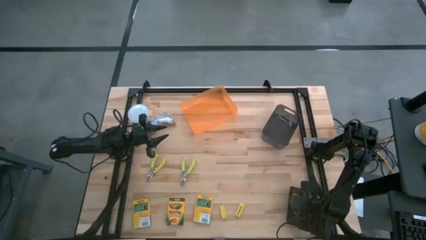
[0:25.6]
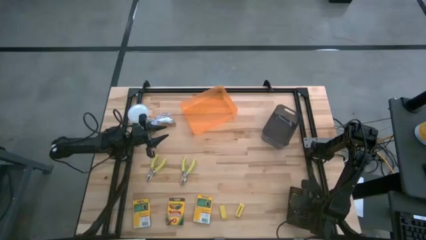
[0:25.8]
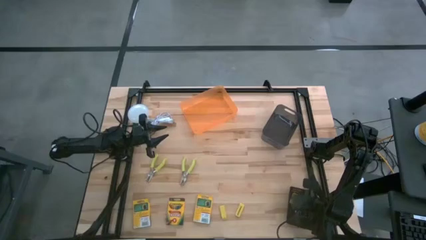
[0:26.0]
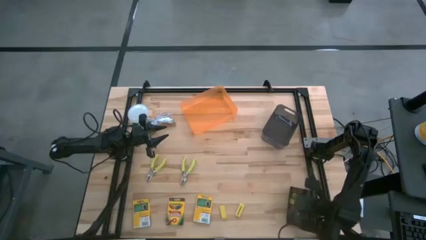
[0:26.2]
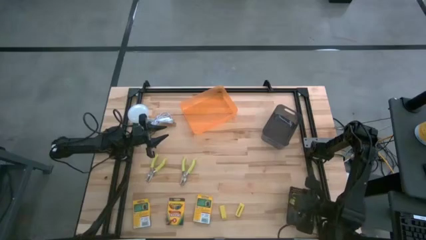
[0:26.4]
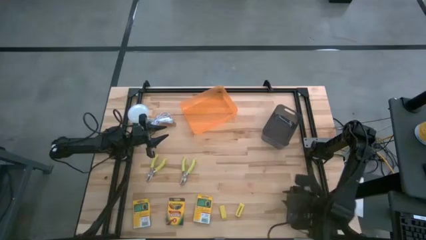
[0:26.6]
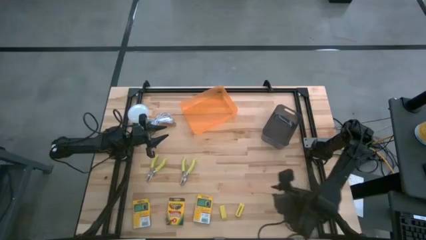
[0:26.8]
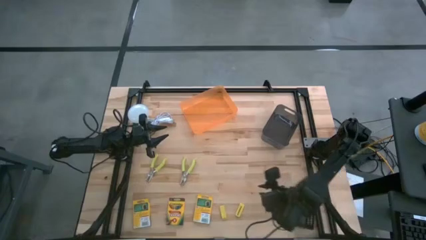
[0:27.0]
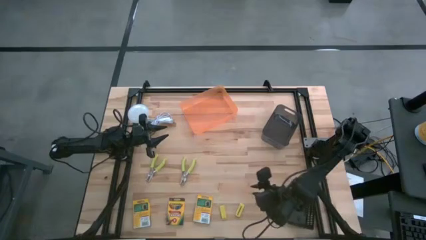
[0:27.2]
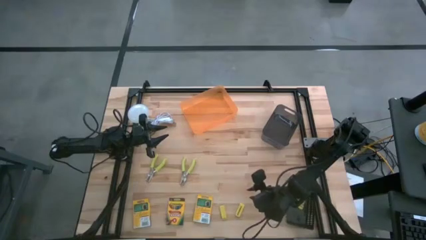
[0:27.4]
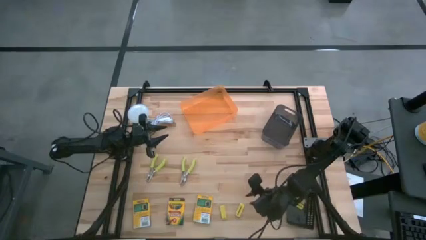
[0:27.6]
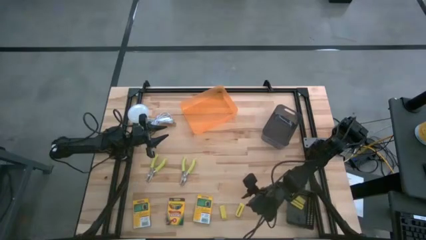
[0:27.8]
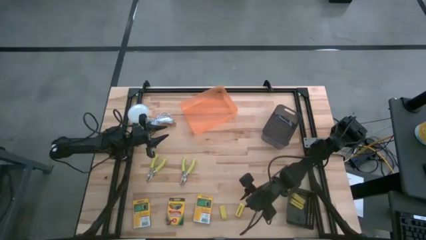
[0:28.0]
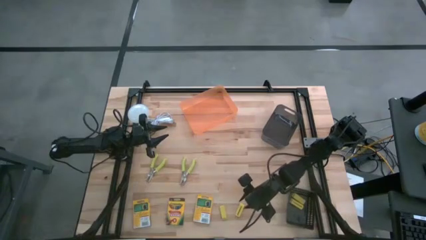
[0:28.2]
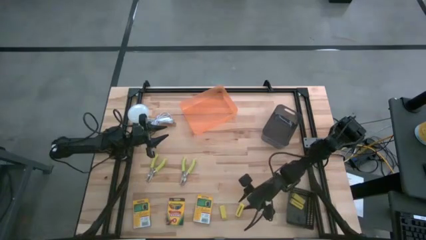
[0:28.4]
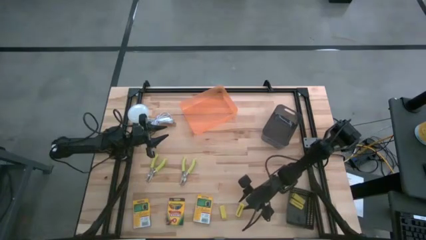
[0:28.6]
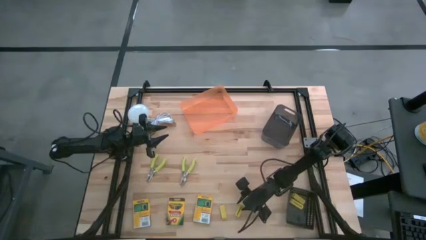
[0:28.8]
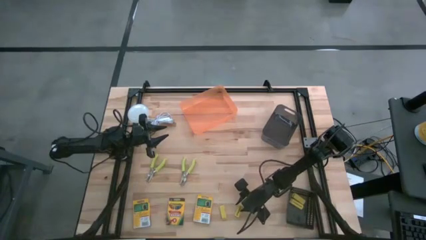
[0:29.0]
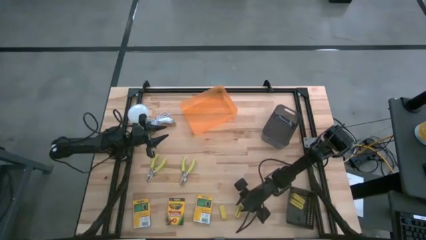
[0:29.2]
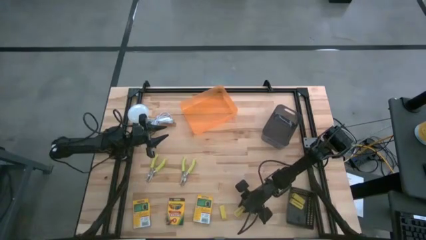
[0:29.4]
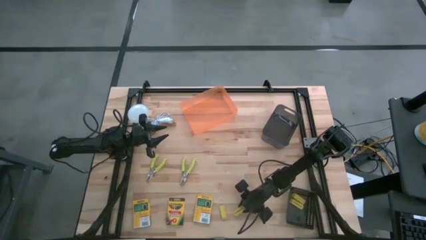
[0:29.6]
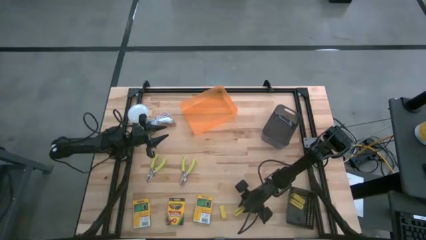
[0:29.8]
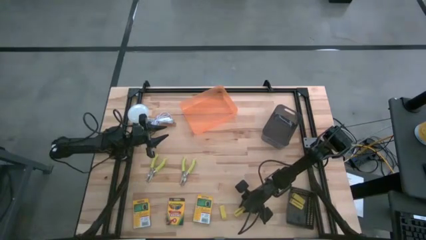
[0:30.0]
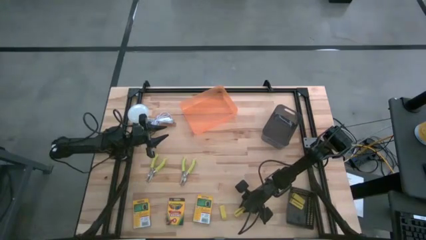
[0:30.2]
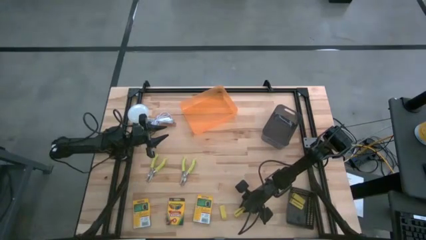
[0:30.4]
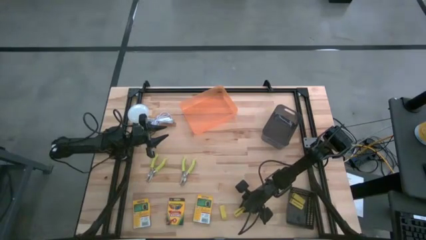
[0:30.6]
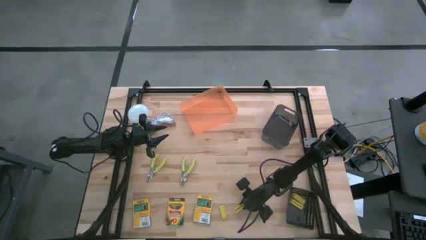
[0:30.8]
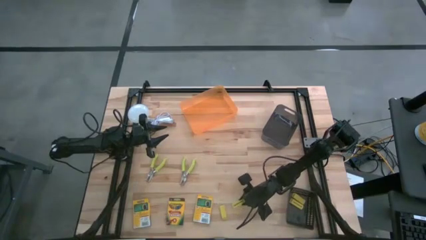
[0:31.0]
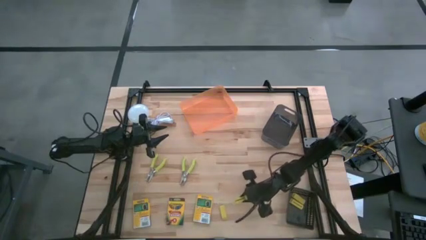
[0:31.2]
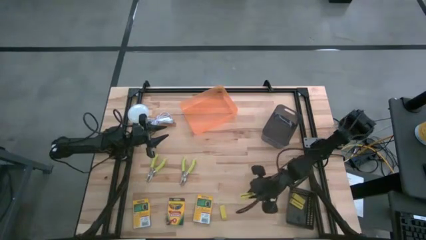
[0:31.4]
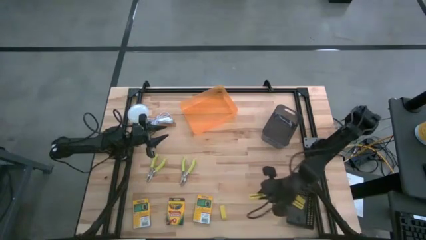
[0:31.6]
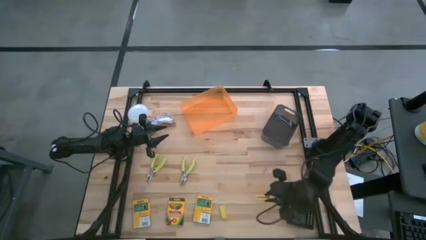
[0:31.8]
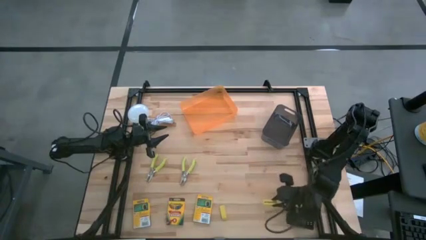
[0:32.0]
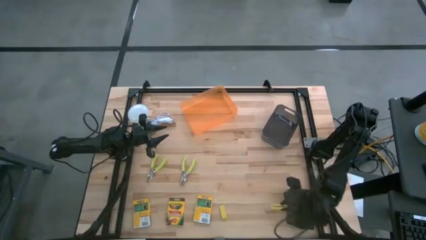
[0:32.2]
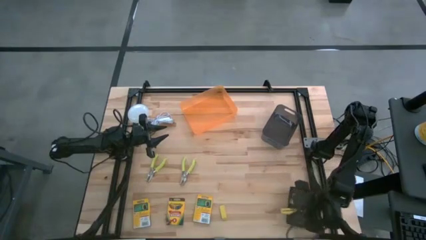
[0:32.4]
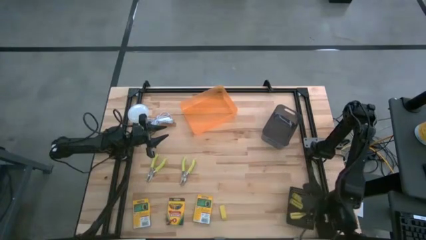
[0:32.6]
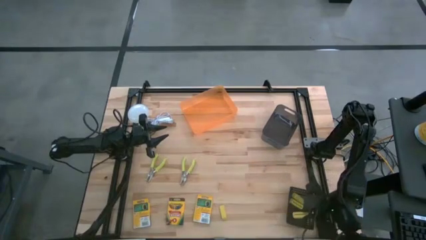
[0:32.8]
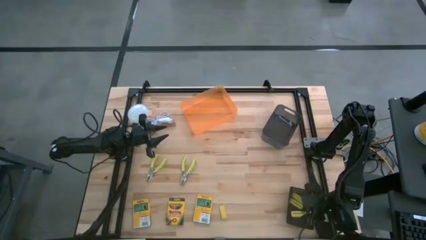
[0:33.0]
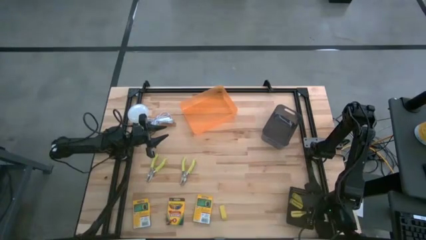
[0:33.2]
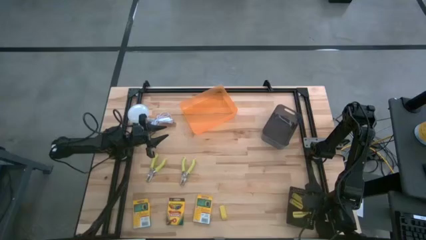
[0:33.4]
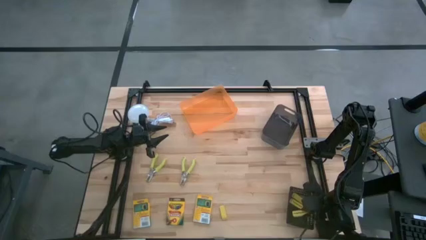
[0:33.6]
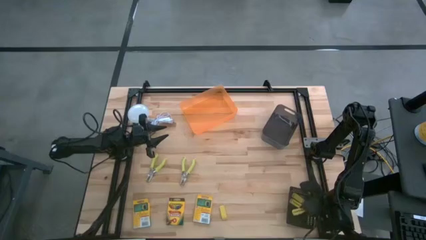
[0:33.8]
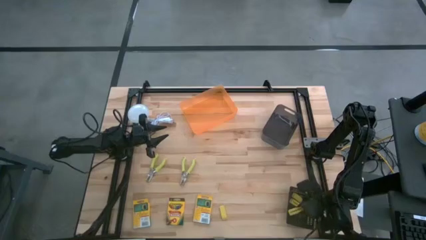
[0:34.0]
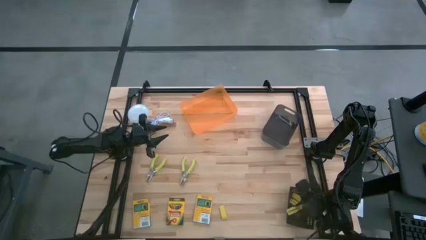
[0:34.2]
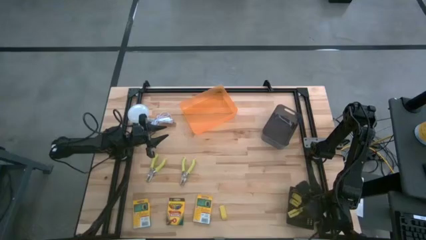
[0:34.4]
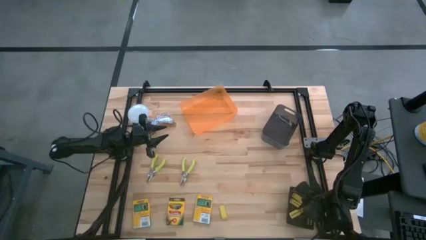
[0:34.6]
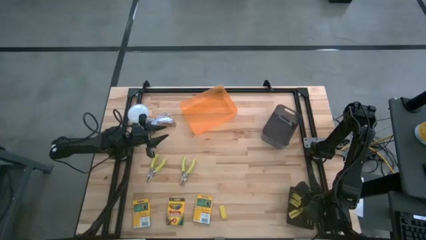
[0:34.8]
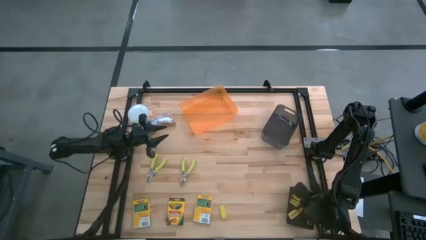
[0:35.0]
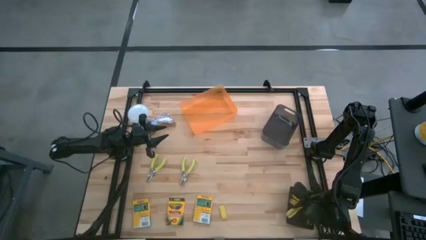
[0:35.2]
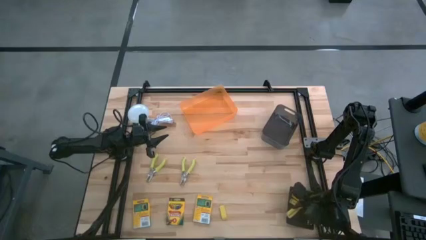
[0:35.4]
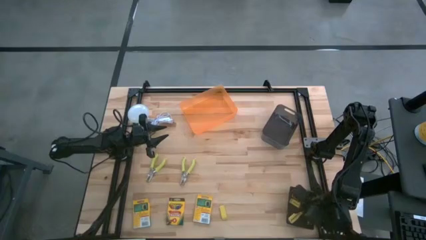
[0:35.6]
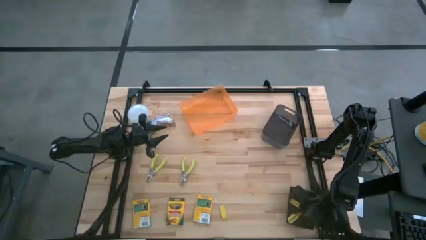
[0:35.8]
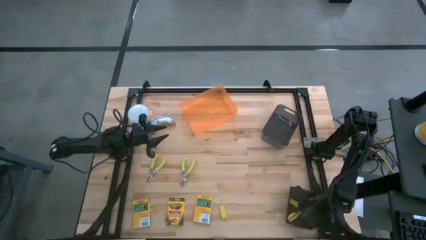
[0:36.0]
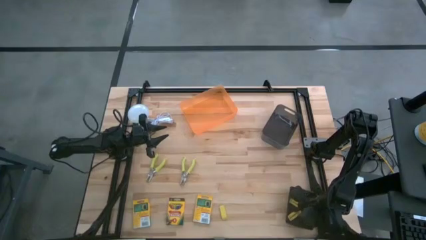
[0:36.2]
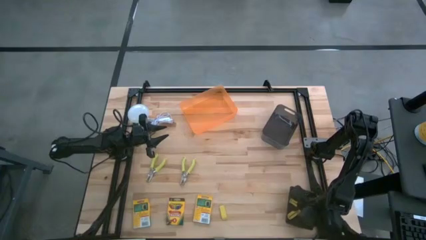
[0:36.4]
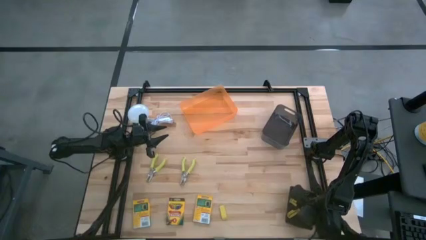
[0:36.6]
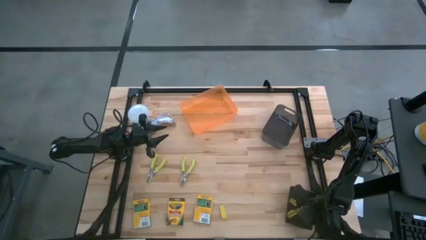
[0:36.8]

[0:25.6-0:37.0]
Task: Pick & Place School Supplies
Put the yellow eraser into the black basket

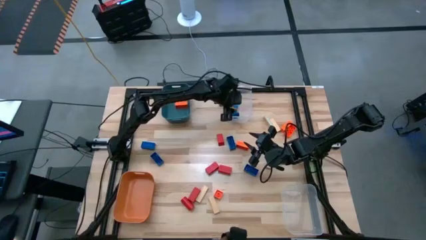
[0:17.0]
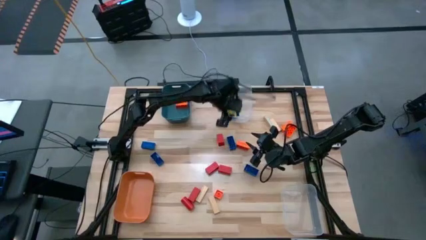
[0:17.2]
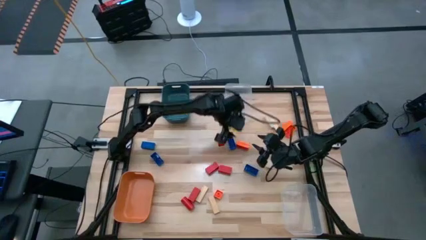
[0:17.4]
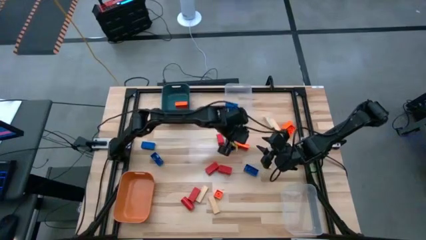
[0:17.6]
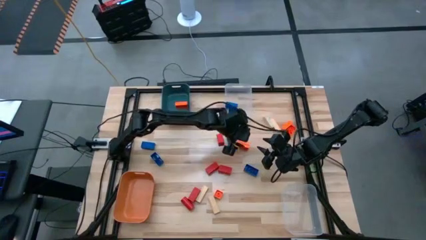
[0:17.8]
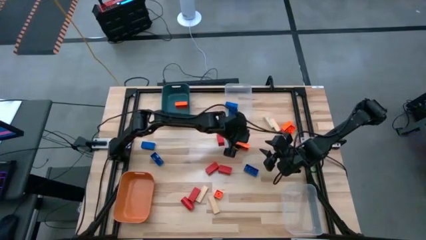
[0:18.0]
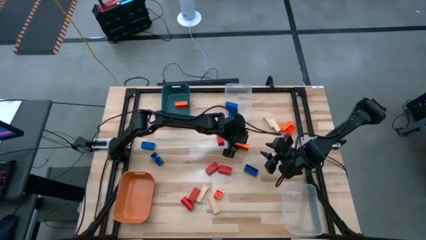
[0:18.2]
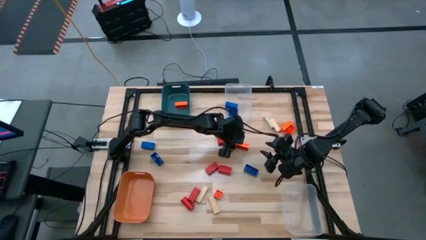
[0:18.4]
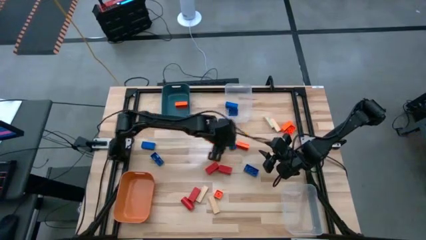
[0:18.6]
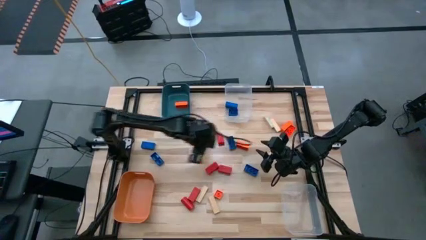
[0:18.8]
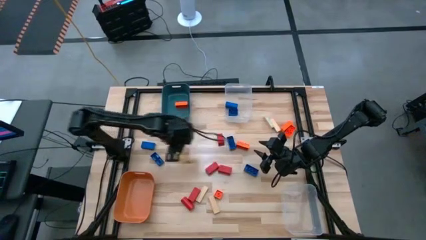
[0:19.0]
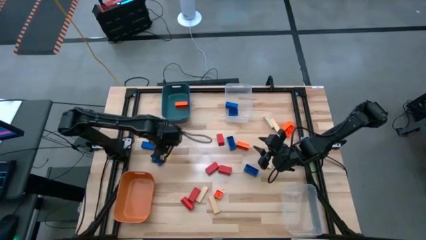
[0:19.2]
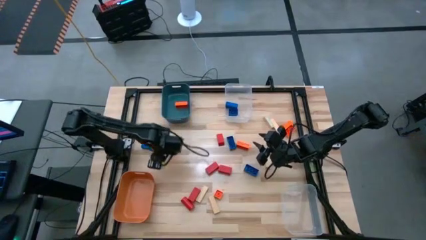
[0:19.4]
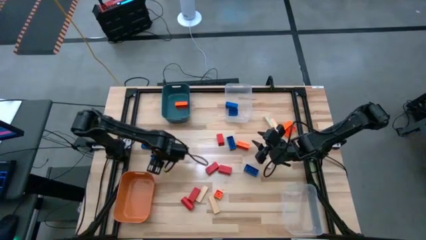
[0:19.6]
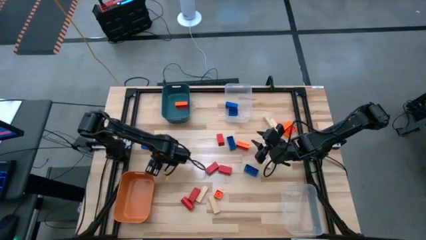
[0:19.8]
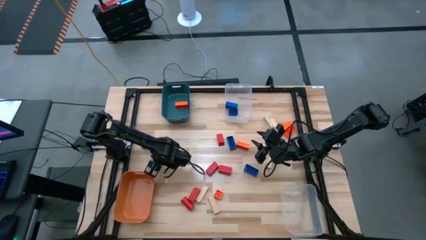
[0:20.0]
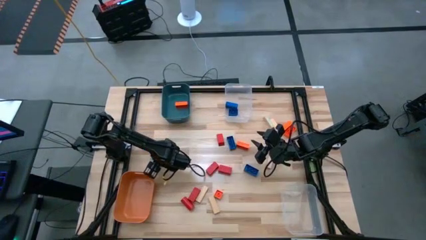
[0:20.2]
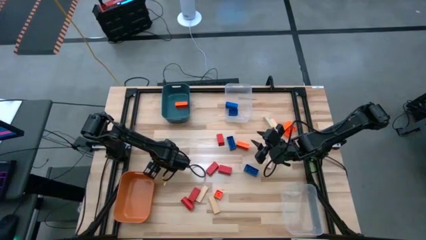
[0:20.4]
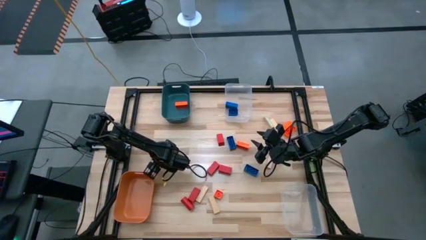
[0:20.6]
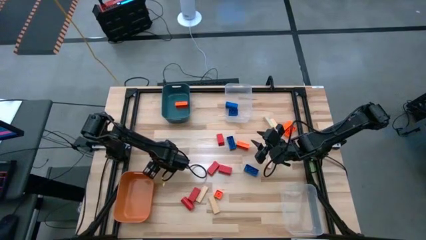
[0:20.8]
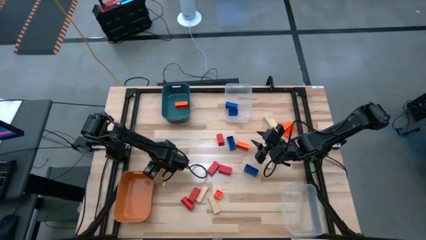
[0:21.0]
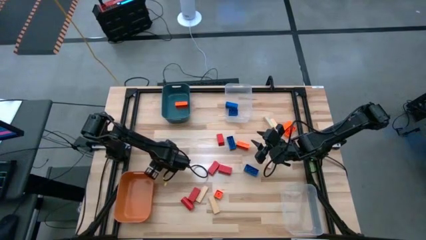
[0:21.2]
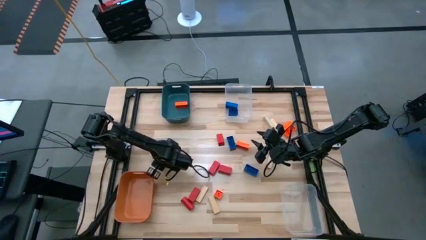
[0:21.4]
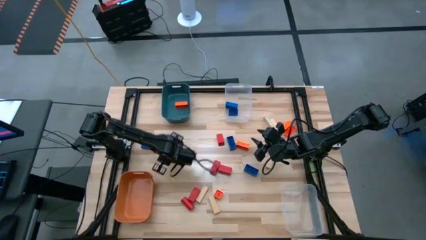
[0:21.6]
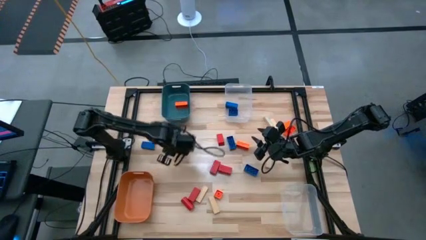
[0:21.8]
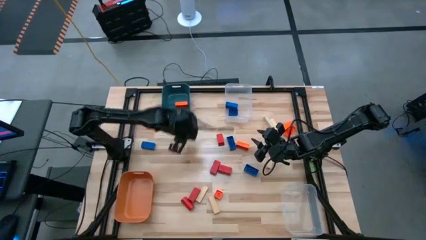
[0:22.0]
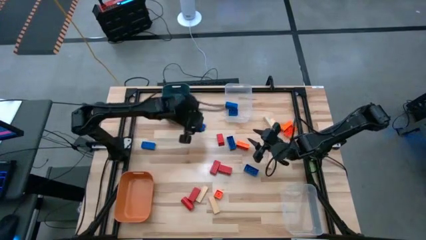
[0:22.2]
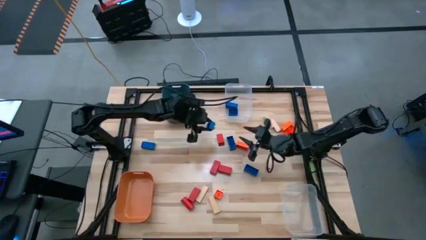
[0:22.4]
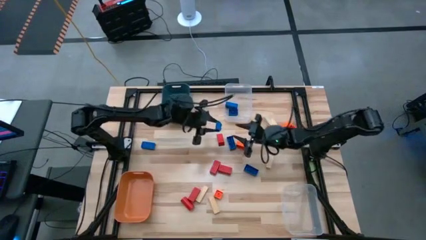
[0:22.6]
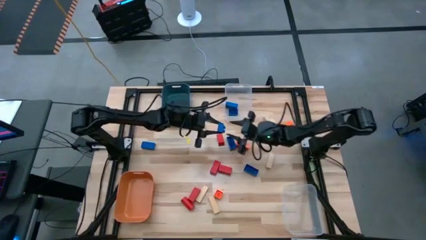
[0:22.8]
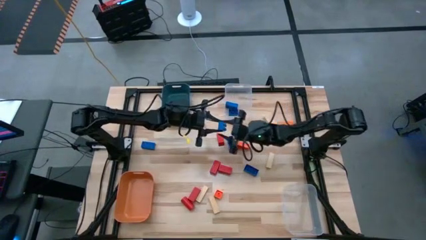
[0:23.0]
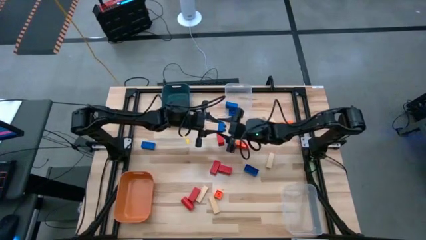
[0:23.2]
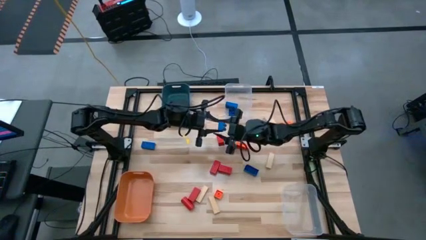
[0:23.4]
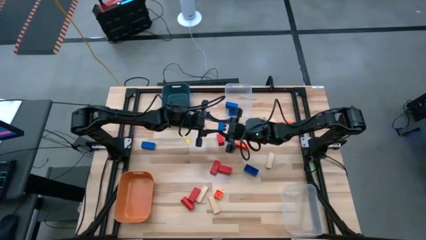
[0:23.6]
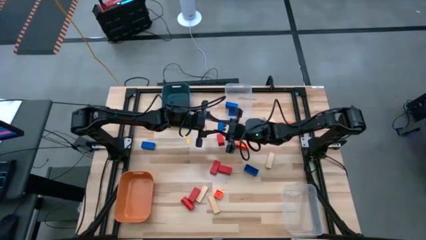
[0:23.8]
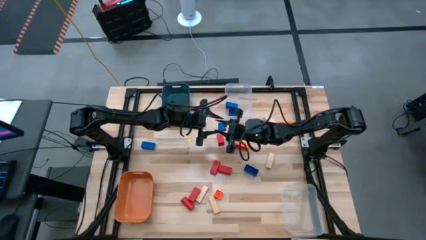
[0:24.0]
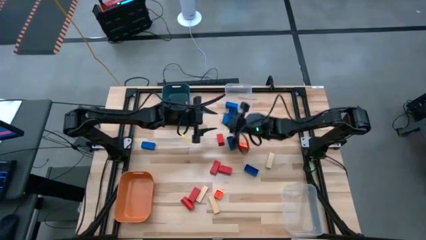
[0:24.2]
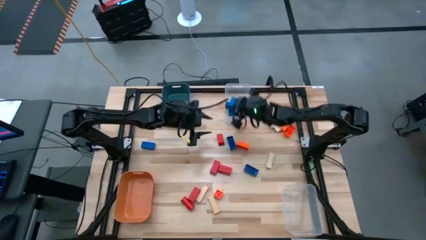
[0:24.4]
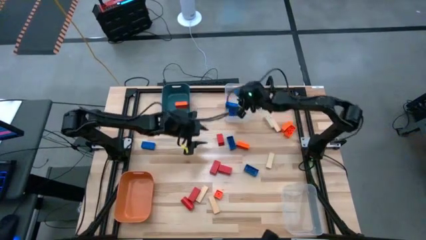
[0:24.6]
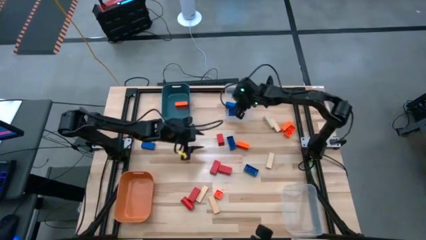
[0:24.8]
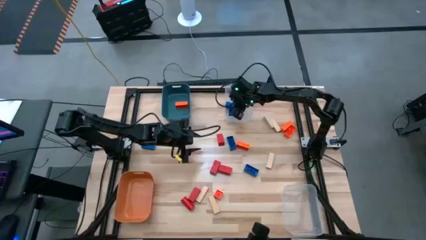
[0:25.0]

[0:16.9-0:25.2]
Task: Sort blocks
Put the blue game piece into the top transparent bin
